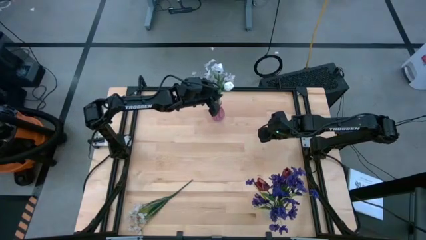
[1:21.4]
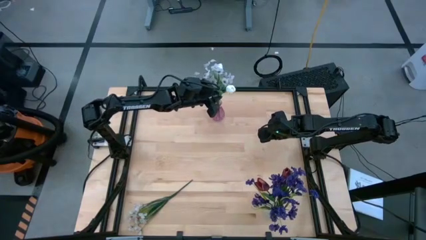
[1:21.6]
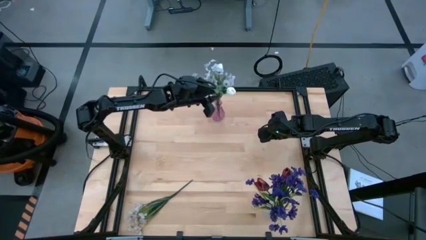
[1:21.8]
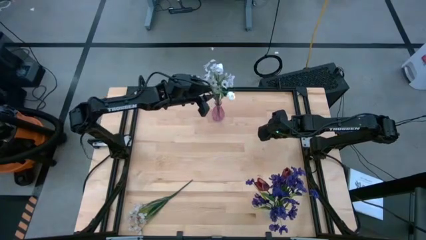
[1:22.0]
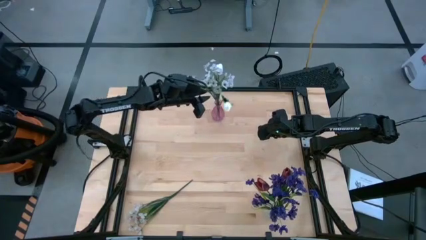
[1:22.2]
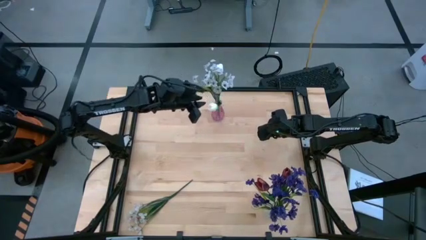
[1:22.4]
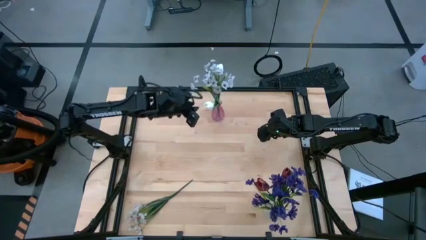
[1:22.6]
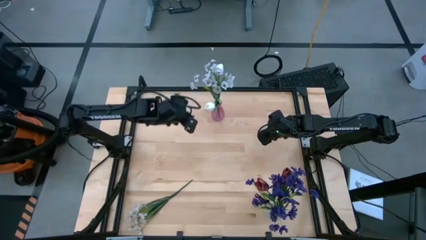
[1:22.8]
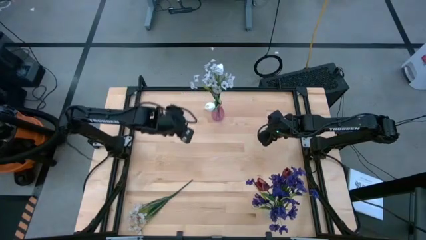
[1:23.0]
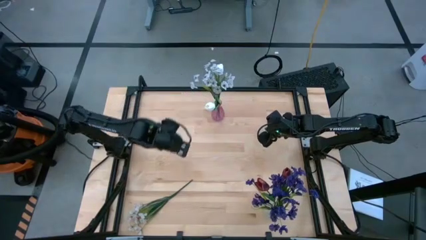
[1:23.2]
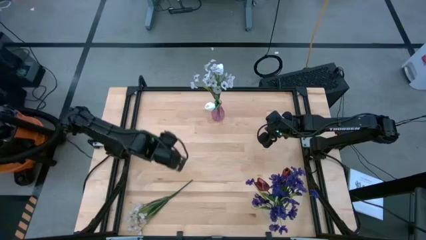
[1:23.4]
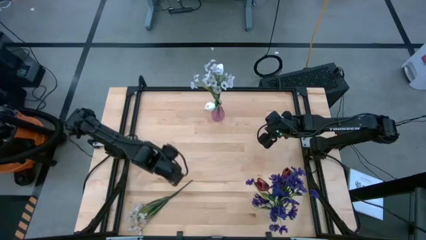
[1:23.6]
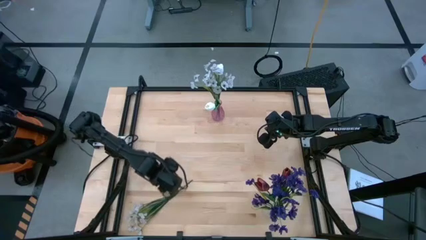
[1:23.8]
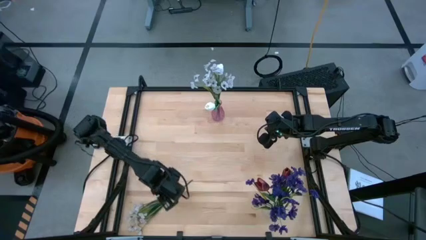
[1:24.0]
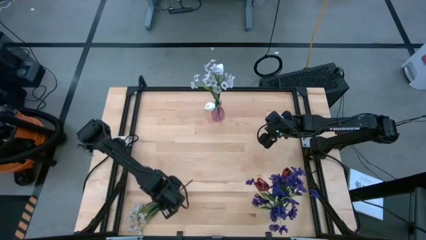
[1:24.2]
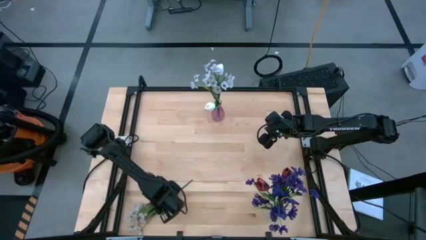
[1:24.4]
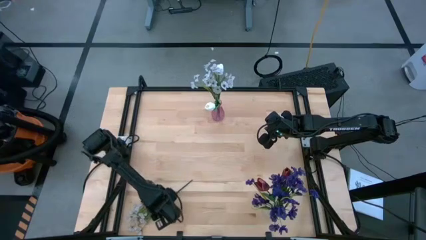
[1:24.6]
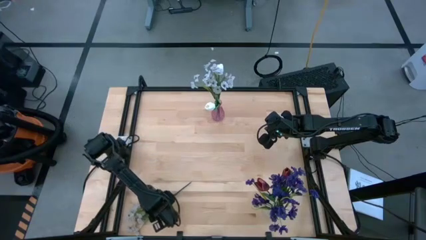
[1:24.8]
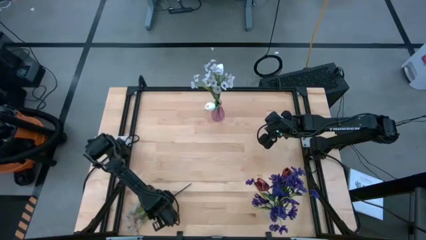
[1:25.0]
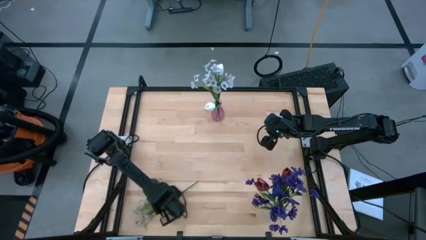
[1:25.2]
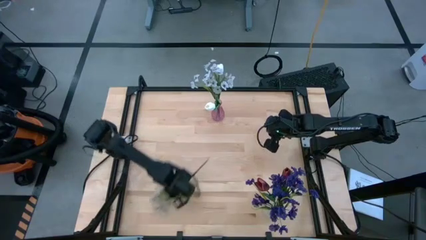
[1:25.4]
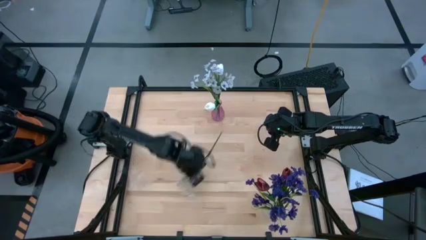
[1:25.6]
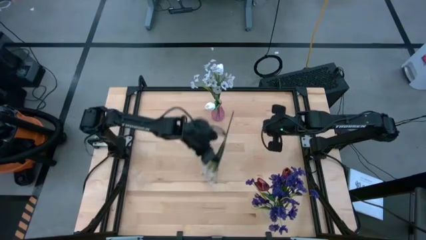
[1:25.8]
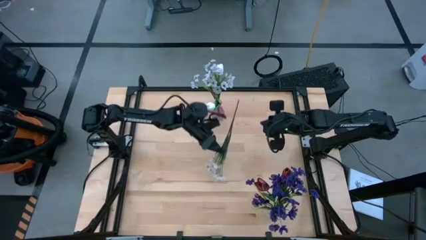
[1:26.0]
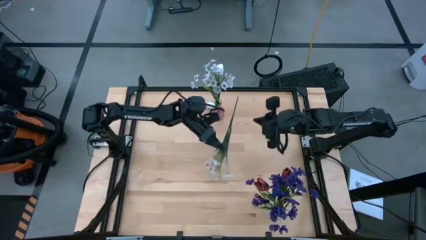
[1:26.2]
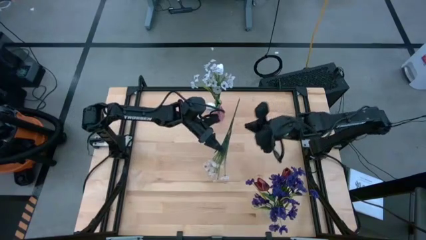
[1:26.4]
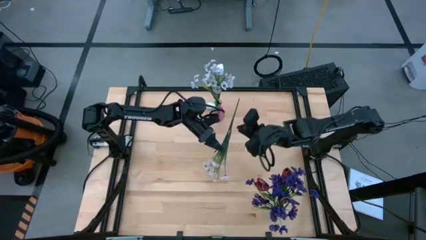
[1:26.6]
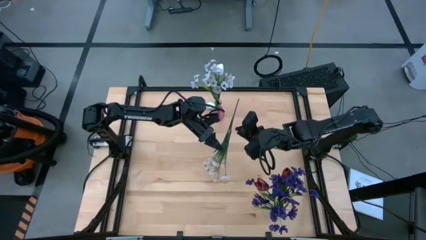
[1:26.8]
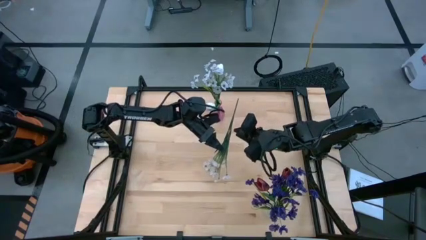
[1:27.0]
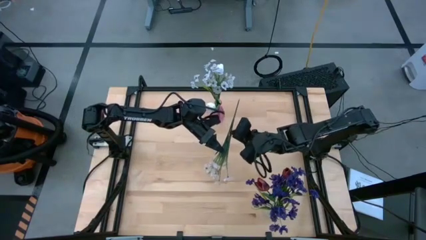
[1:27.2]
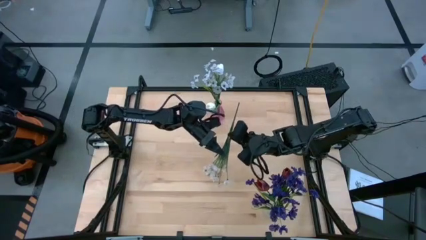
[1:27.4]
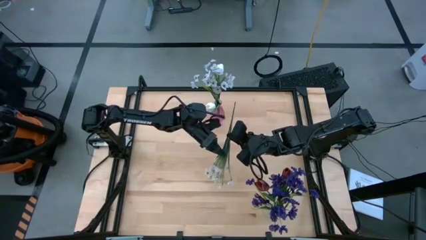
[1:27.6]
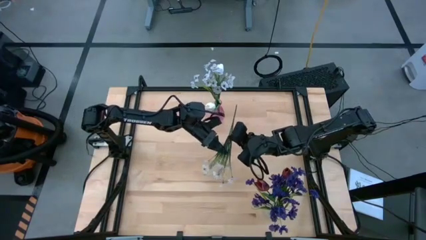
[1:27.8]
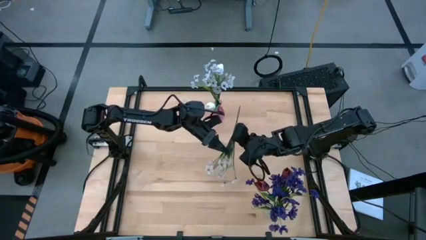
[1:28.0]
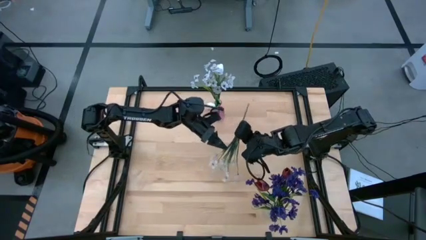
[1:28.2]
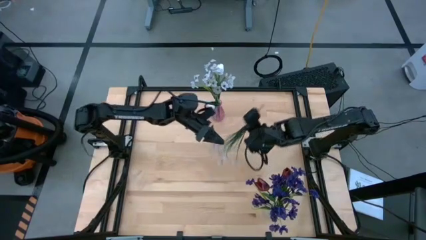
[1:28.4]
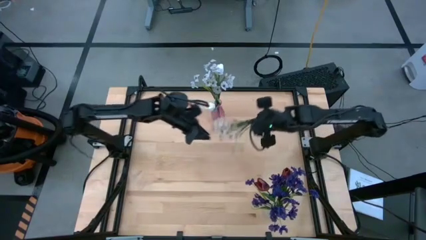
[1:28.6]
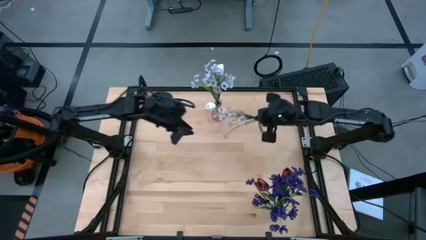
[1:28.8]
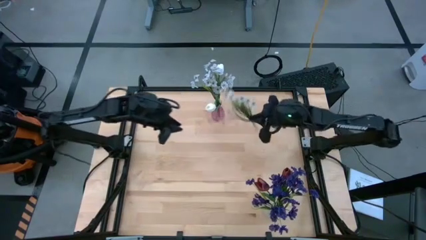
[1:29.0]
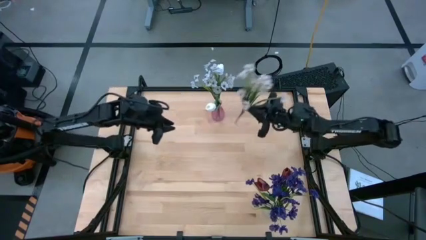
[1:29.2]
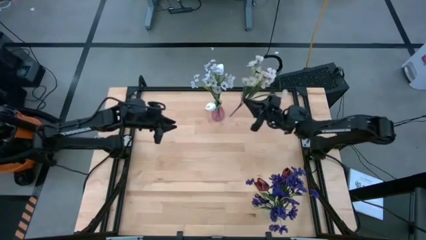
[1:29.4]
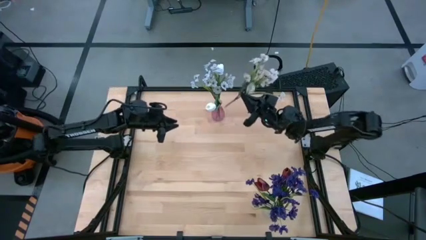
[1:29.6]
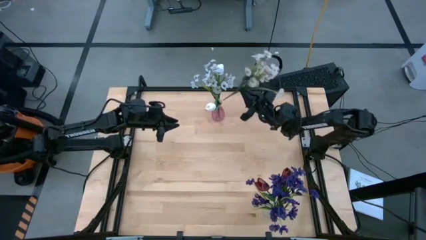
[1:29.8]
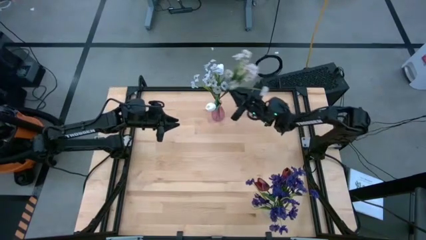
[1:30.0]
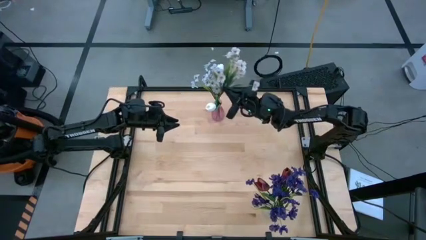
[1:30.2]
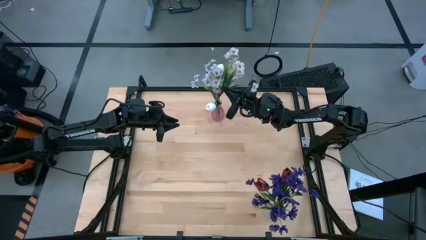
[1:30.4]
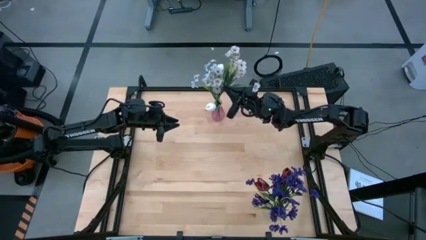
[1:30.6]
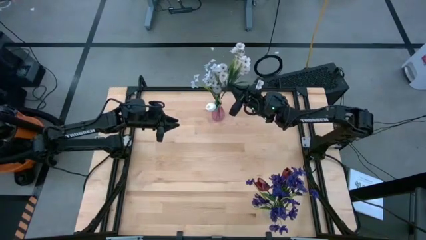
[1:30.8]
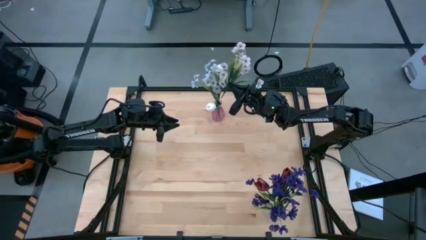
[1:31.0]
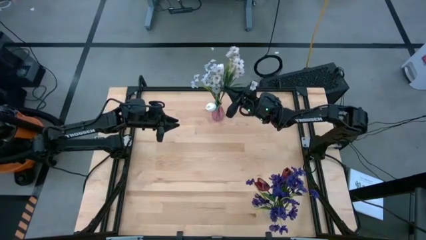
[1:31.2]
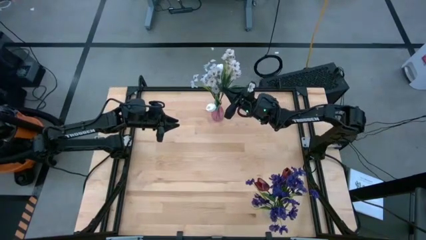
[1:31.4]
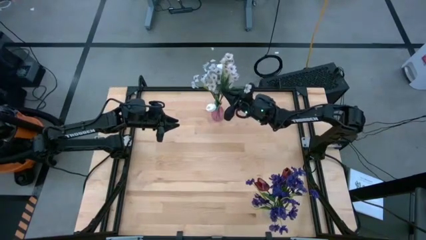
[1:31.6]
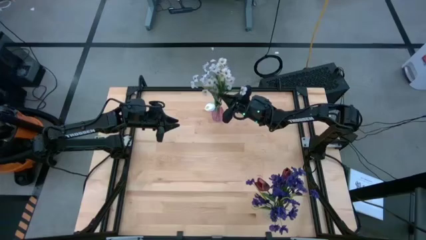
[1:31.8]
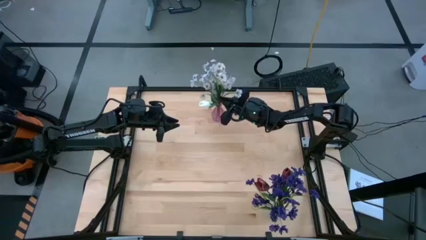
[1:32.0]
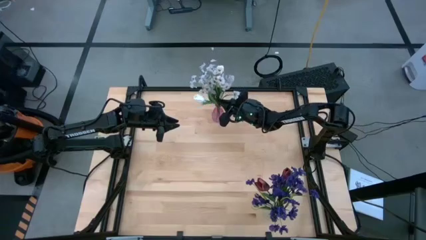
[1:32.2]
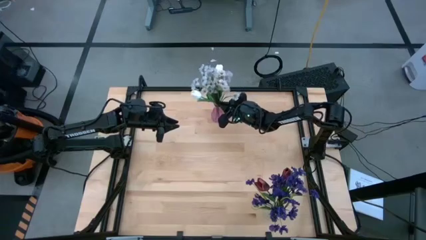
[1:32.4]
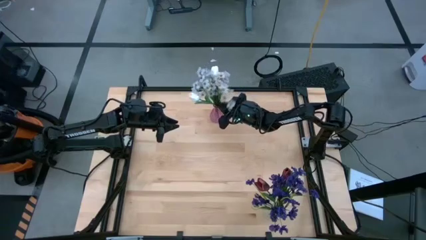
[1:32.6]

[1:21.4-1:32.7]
Task: Sort flowers into vase by color
Put the white flowers into the pink vase

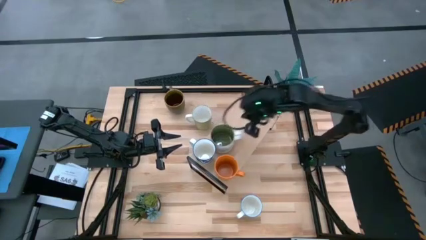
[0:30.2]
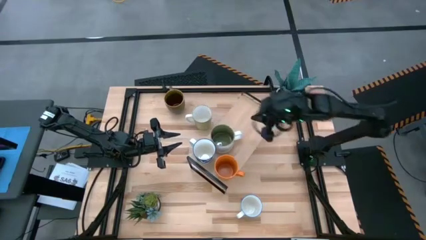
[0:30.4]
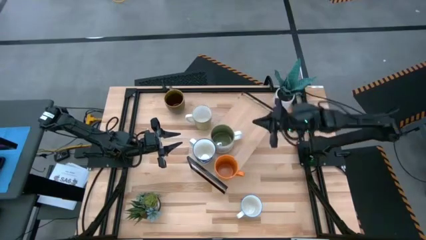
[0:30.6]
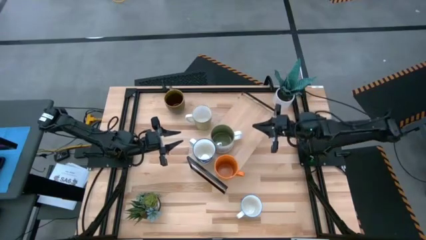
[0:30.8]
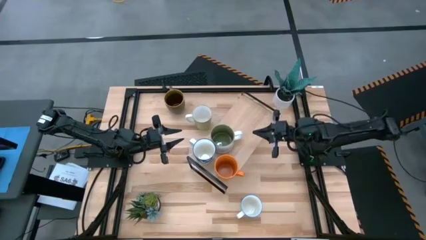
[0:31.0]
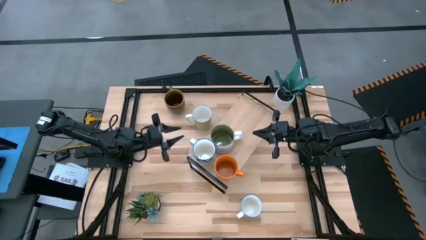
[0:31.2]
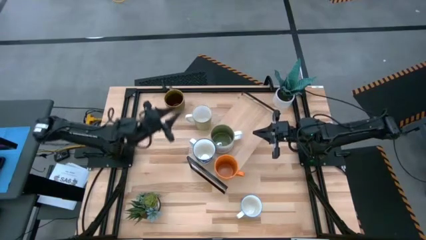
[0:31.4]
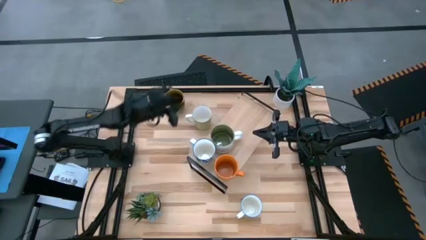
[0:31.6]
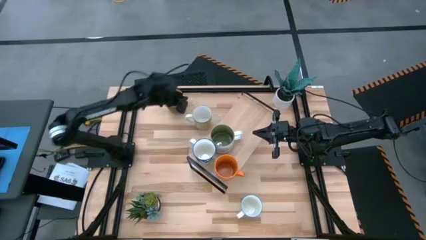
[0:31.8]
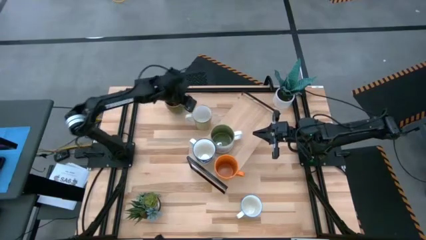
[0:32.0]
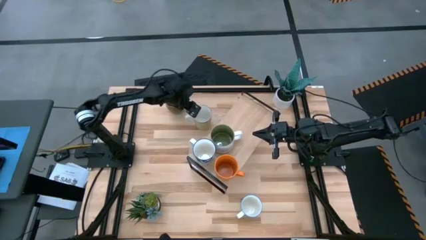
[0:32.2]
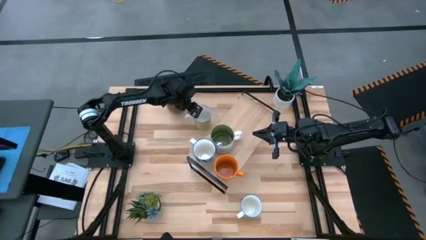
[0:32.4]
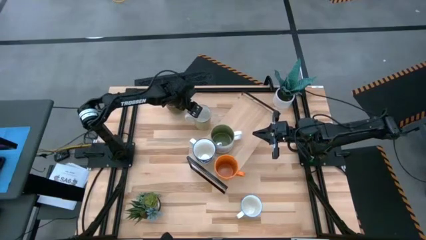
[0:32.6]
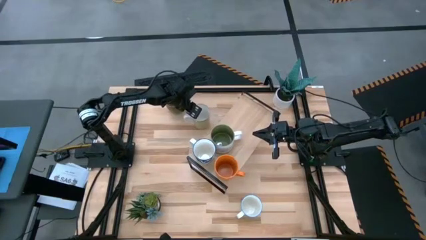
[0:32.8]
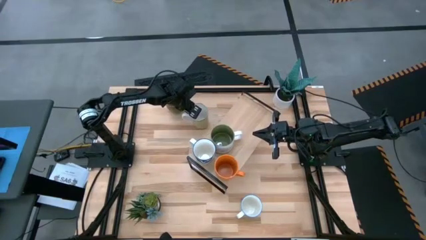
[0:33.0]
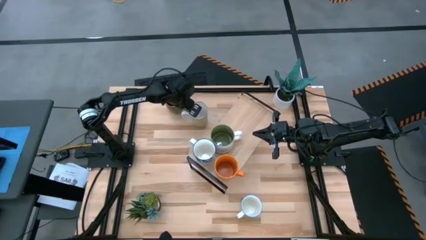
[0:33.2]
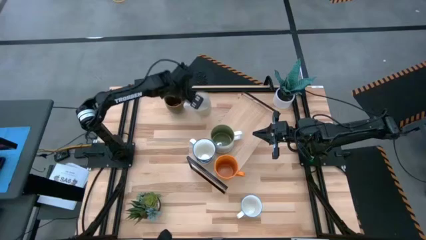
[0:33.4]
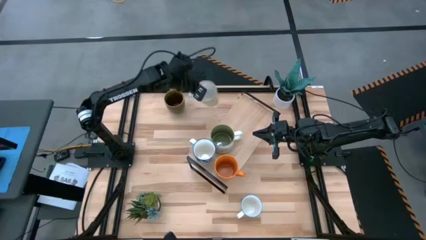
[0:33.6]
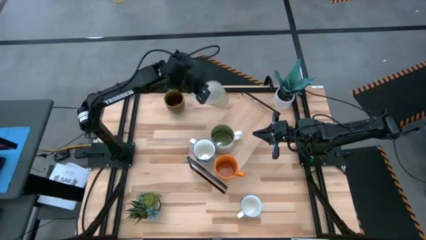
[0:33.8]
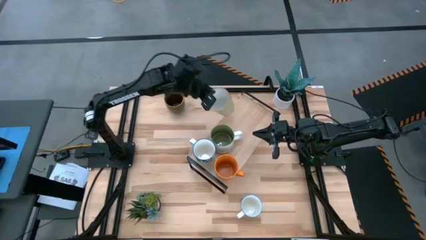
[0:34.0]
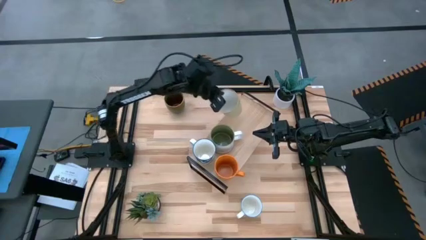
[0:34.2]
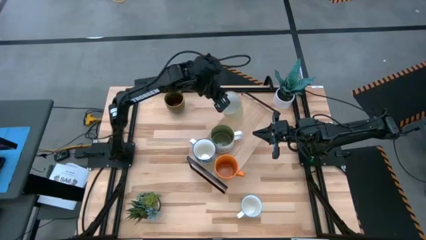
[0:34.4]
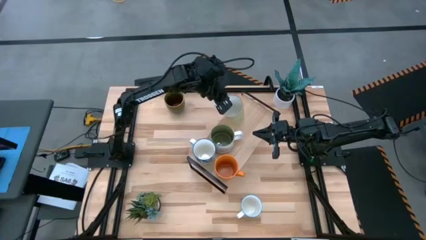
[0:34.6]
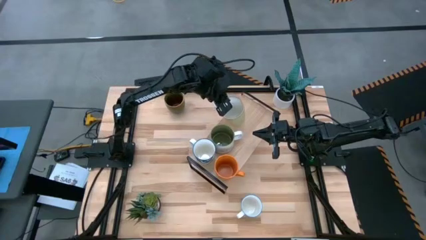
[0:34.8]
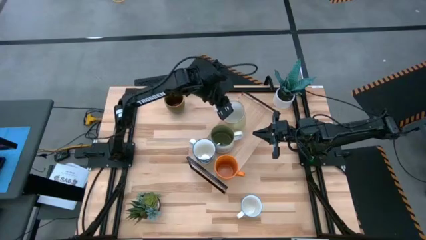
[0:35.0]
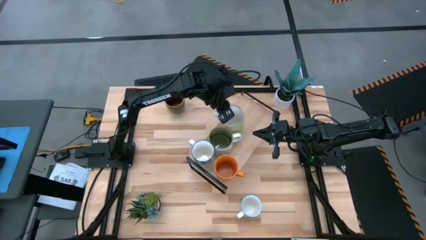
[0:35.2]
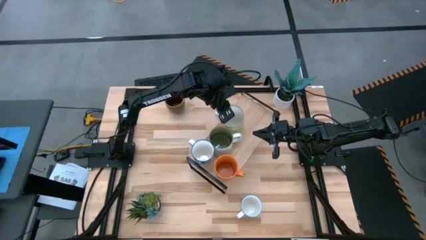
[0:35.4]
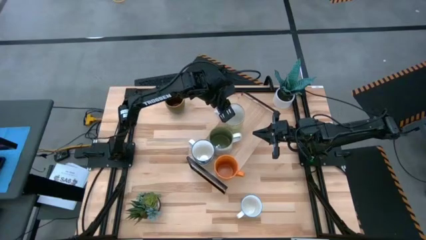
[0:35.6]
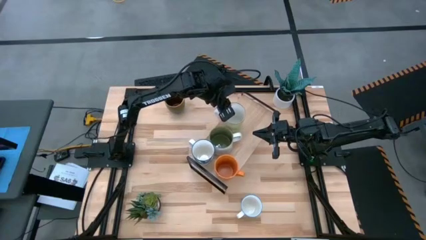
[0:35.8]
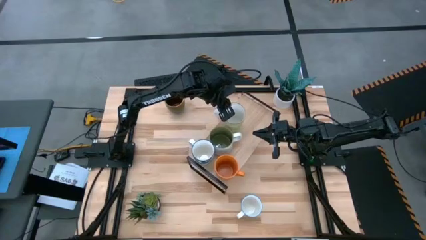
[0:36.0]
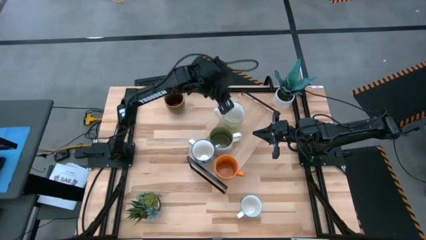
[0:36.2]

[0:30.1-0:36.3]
Task: Place coffee mugs
Put the light green mug on the shelf
